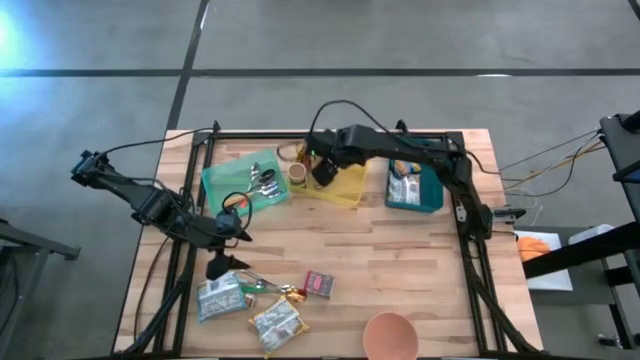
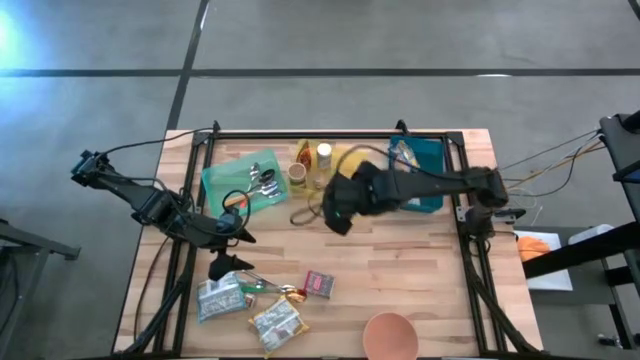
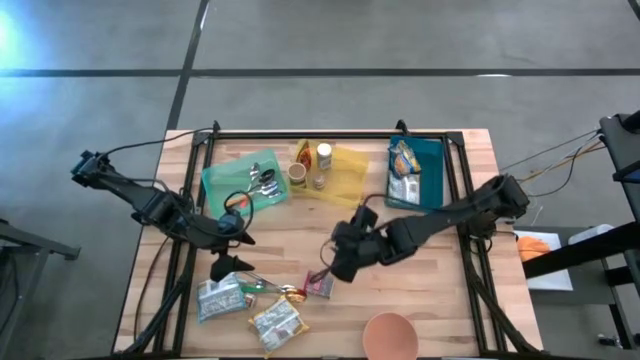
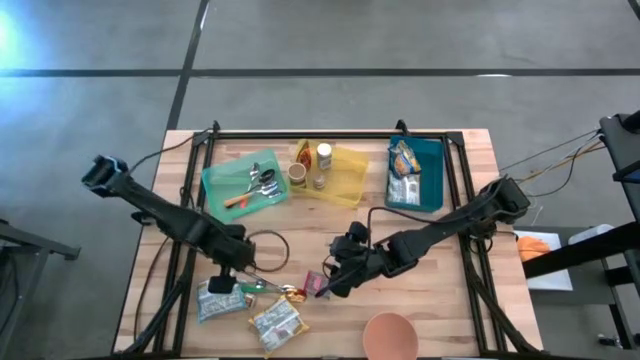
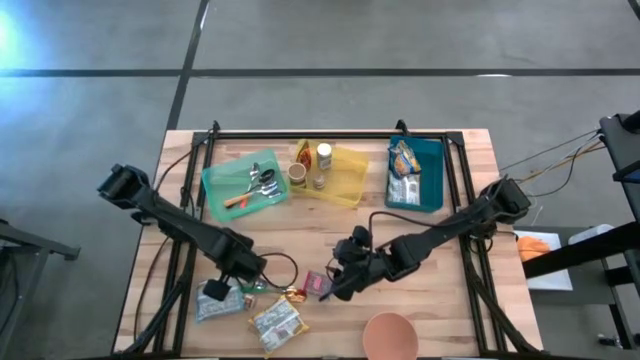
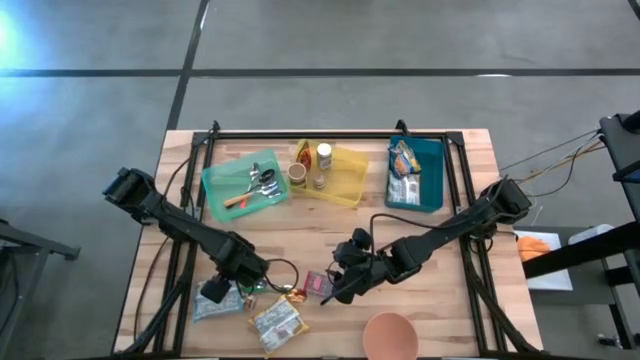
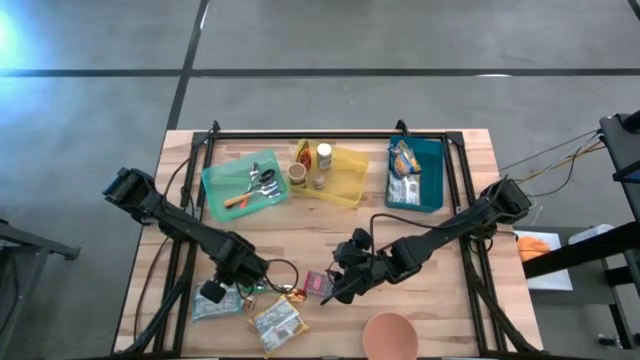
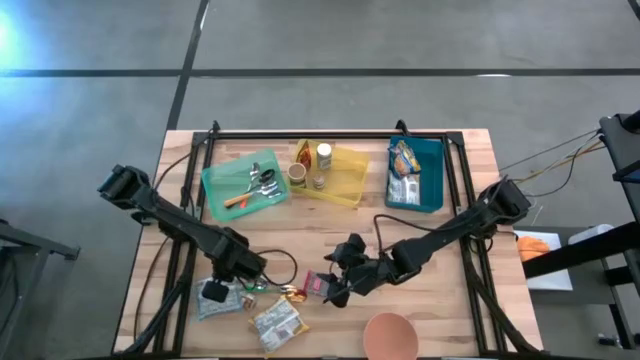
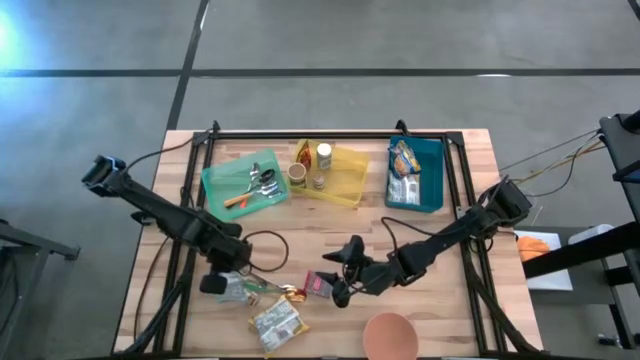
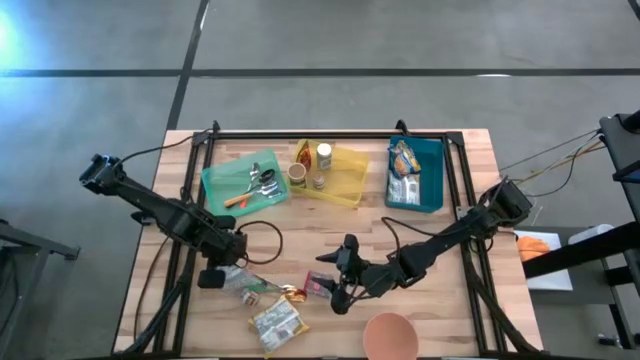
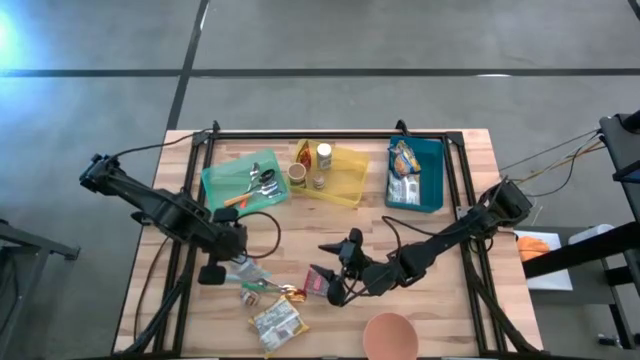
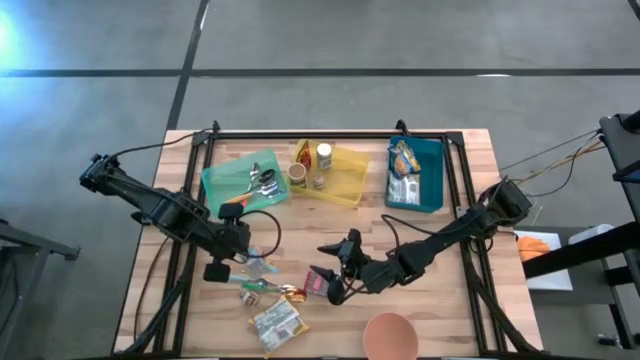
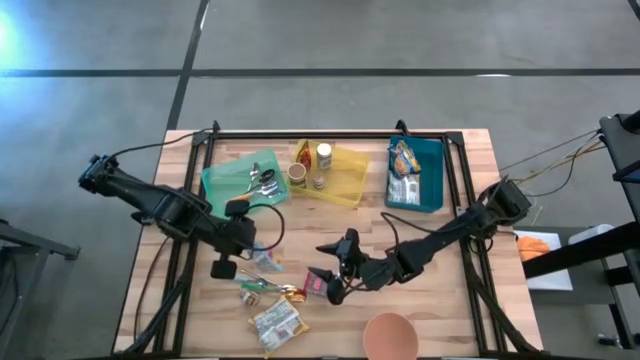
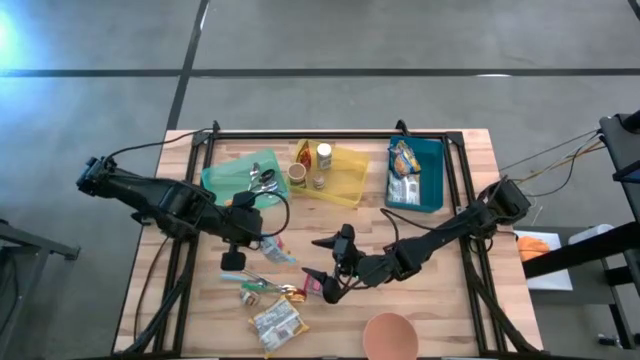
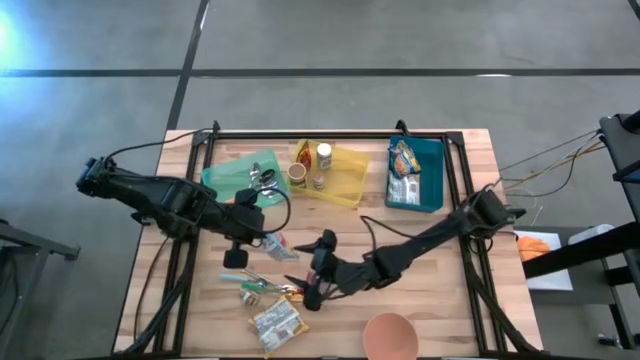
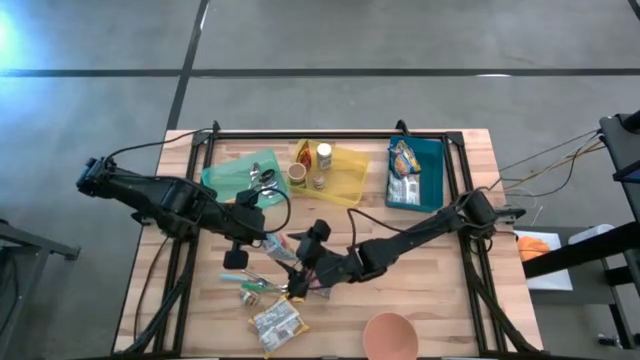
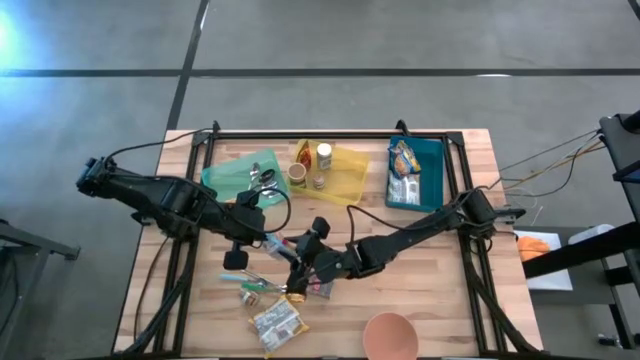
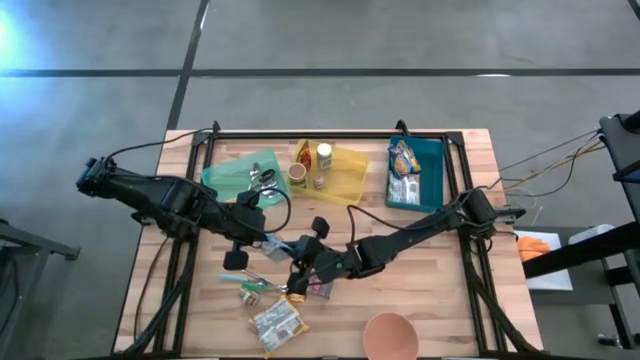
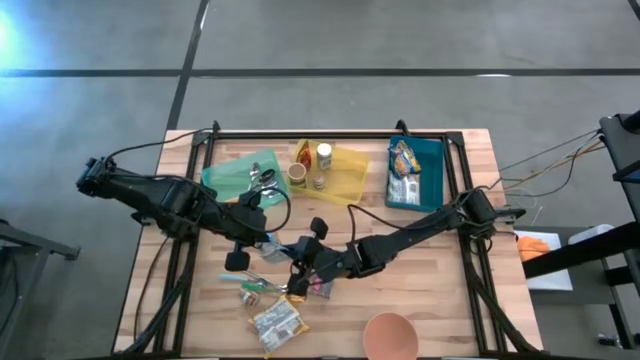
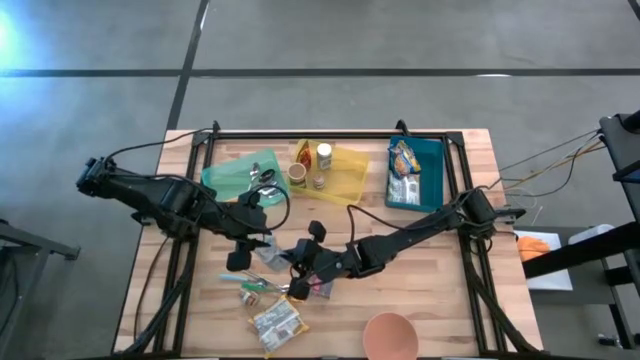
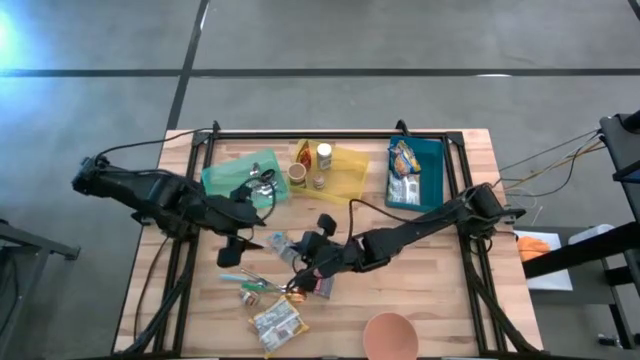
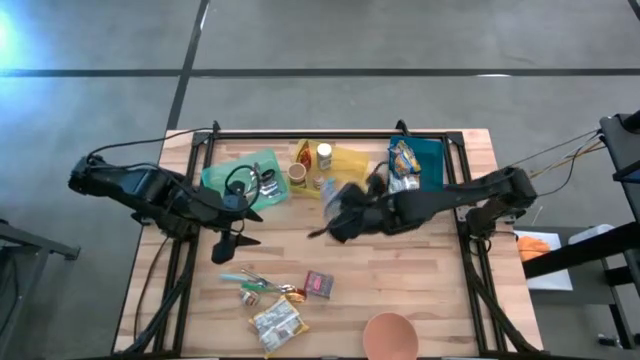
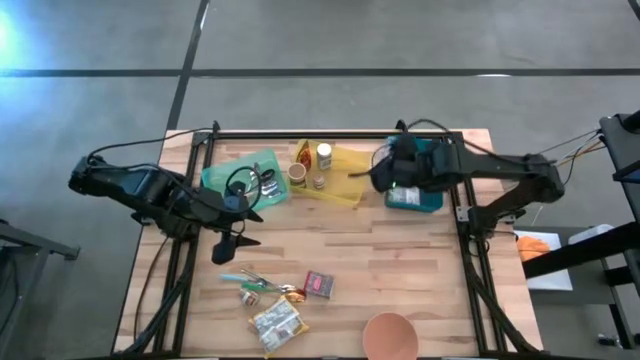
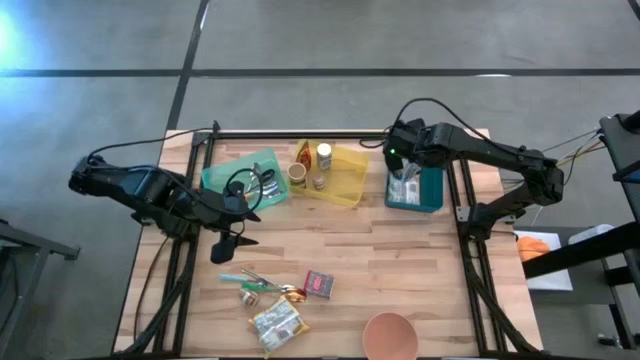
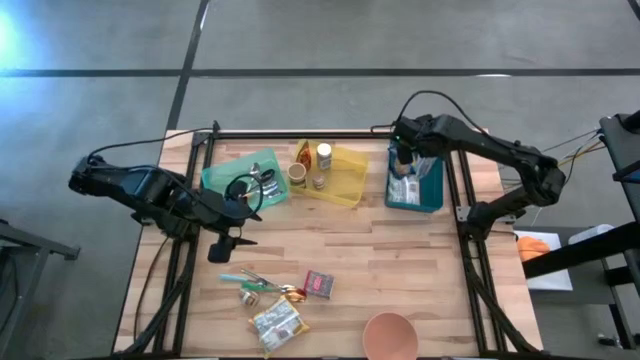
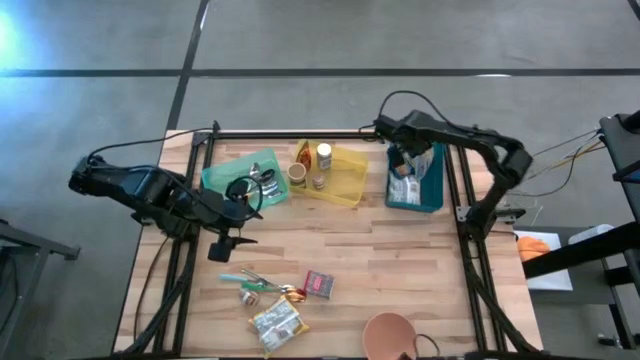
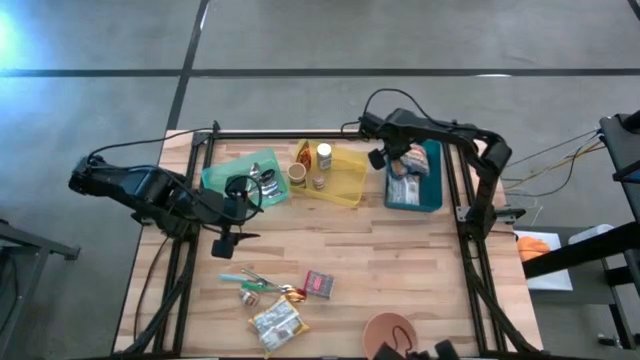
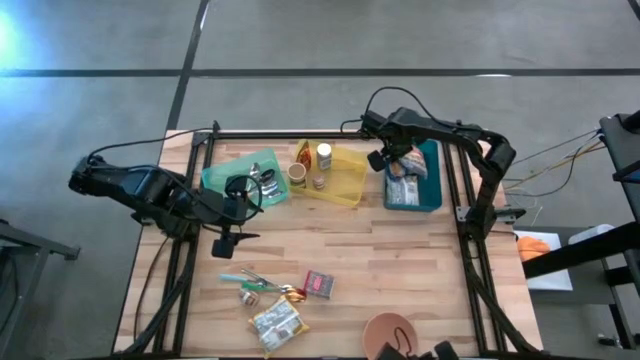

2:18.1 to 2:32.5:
Put the light blue noodle pack into the blue bin
